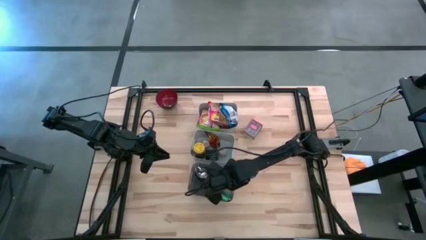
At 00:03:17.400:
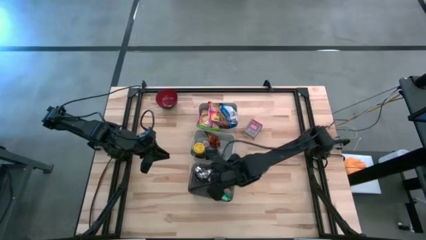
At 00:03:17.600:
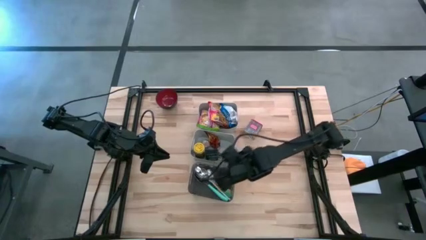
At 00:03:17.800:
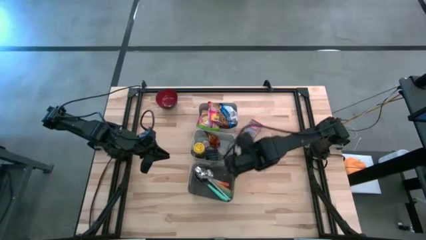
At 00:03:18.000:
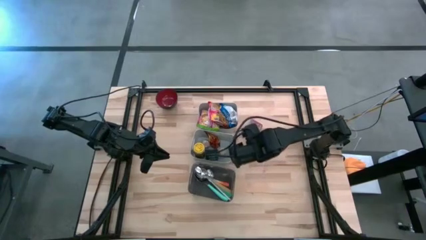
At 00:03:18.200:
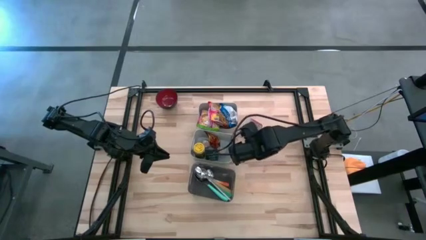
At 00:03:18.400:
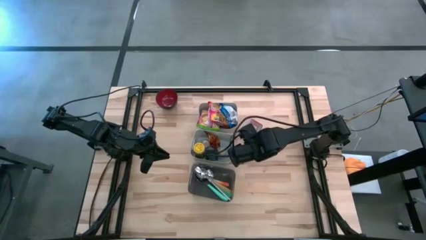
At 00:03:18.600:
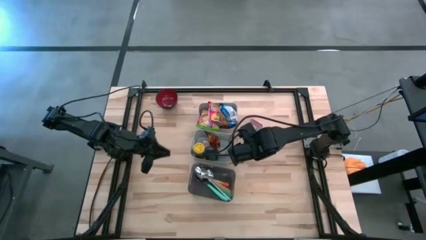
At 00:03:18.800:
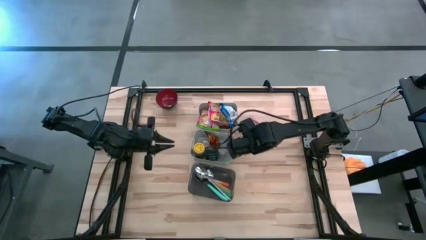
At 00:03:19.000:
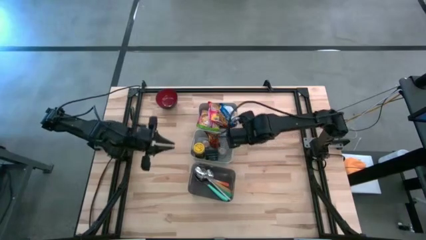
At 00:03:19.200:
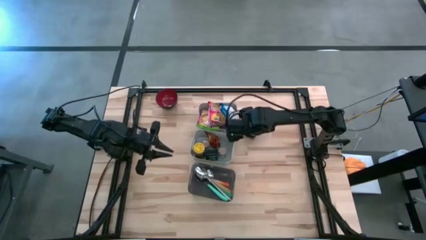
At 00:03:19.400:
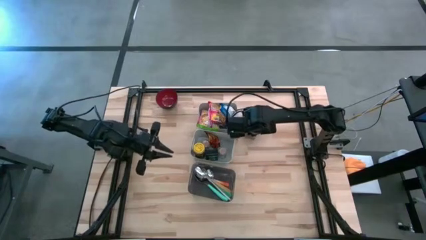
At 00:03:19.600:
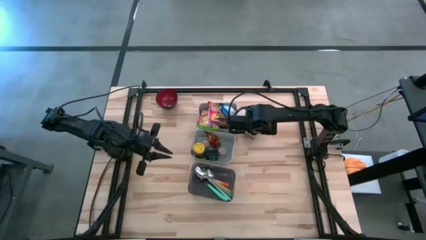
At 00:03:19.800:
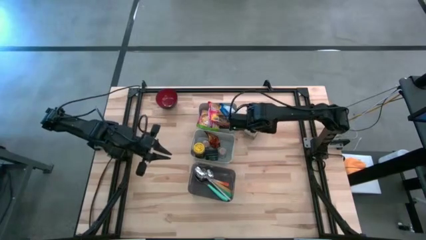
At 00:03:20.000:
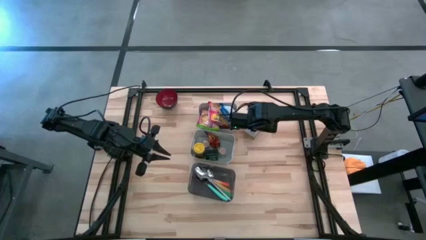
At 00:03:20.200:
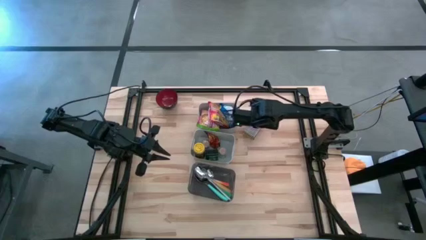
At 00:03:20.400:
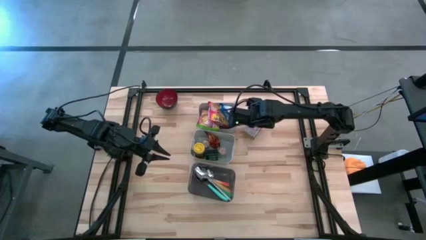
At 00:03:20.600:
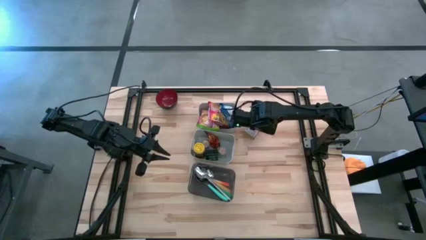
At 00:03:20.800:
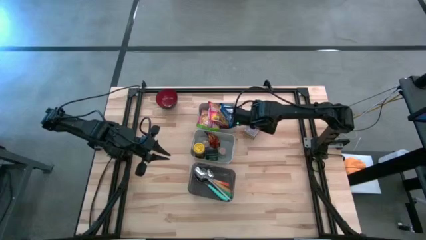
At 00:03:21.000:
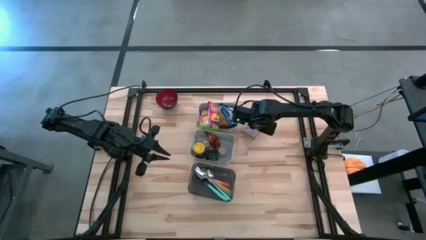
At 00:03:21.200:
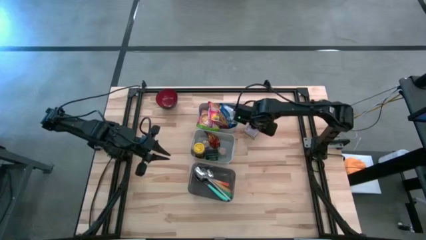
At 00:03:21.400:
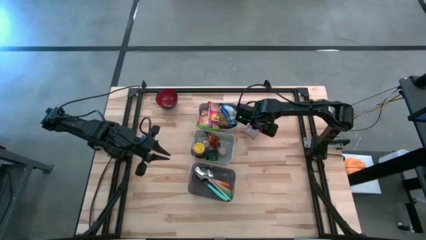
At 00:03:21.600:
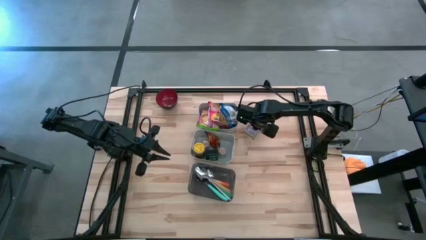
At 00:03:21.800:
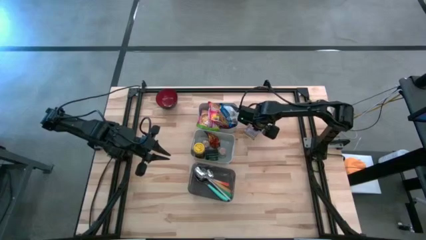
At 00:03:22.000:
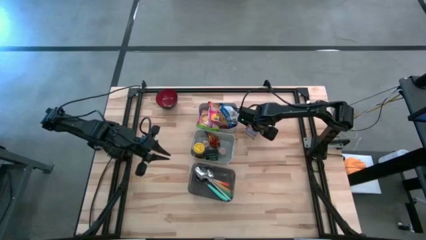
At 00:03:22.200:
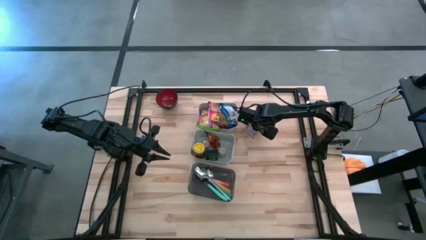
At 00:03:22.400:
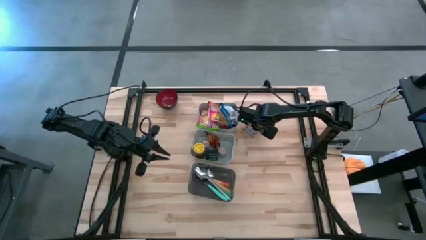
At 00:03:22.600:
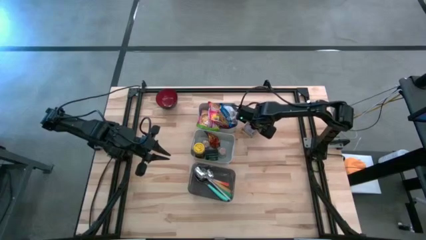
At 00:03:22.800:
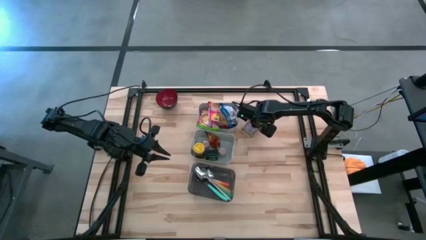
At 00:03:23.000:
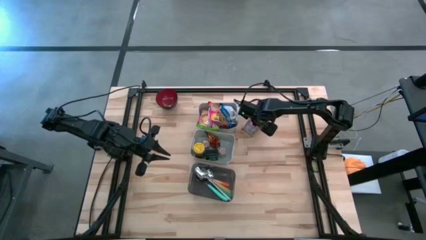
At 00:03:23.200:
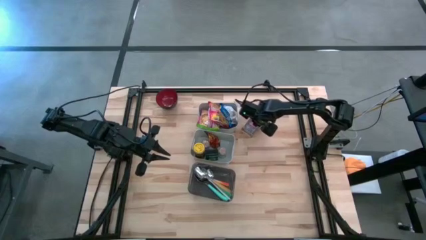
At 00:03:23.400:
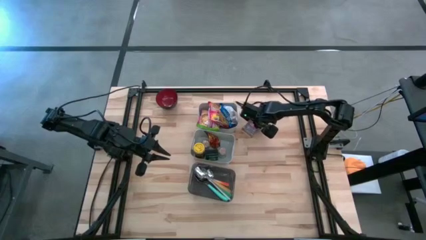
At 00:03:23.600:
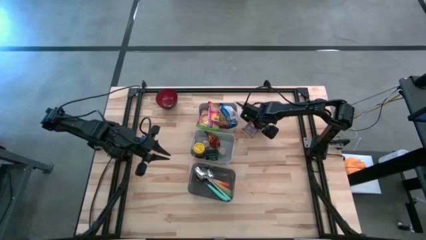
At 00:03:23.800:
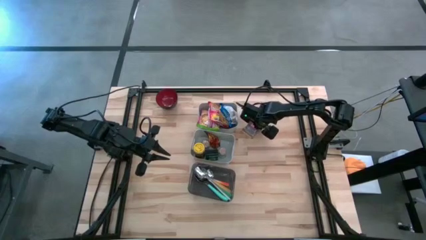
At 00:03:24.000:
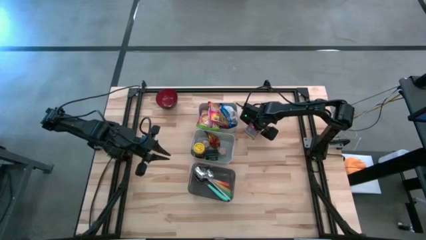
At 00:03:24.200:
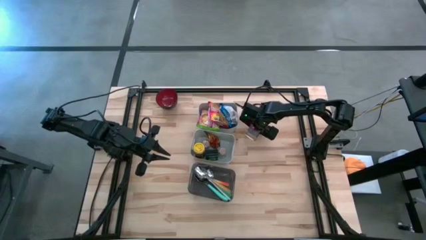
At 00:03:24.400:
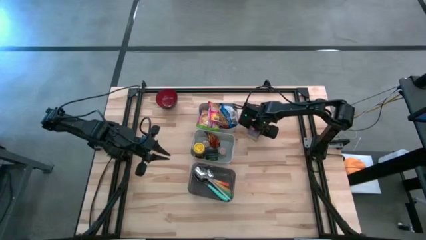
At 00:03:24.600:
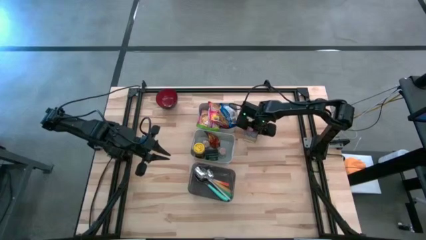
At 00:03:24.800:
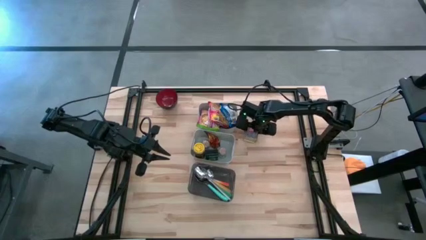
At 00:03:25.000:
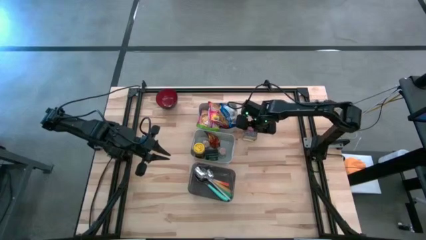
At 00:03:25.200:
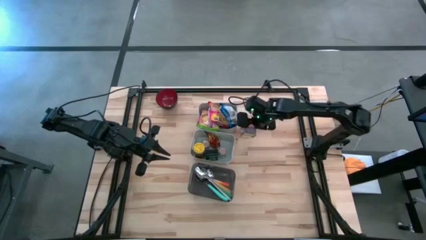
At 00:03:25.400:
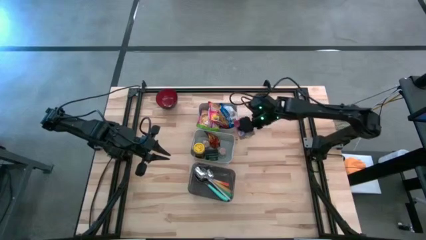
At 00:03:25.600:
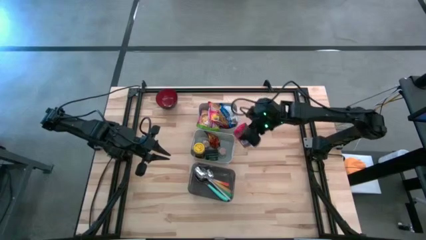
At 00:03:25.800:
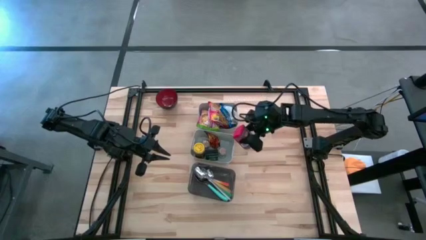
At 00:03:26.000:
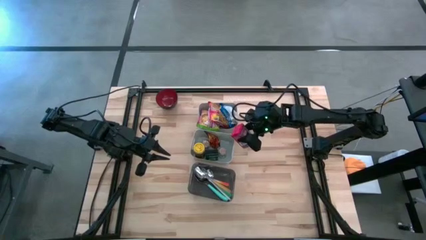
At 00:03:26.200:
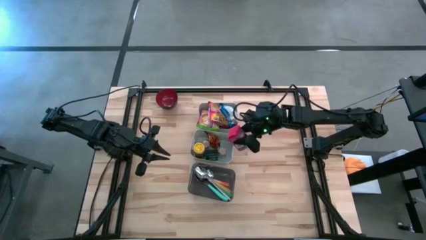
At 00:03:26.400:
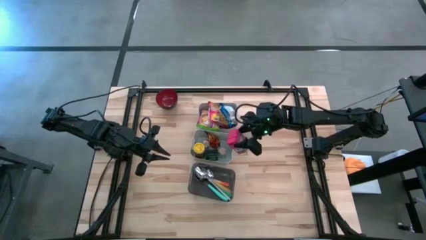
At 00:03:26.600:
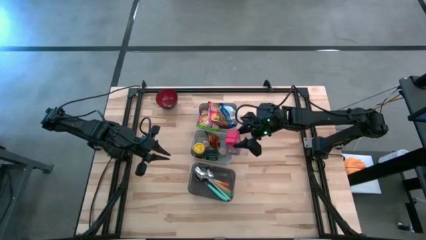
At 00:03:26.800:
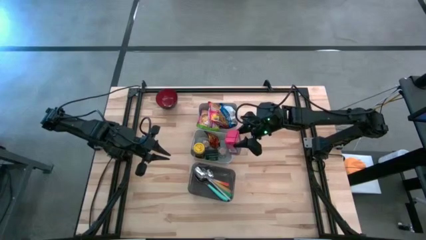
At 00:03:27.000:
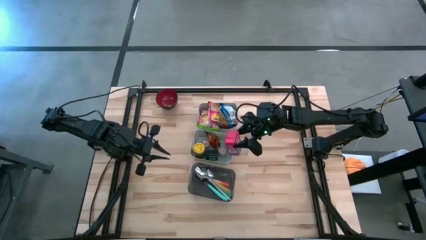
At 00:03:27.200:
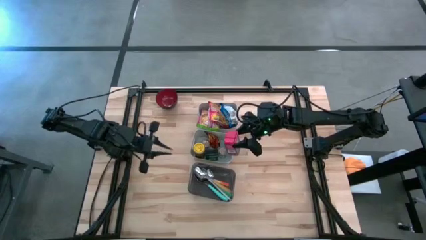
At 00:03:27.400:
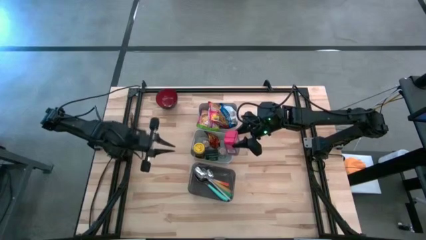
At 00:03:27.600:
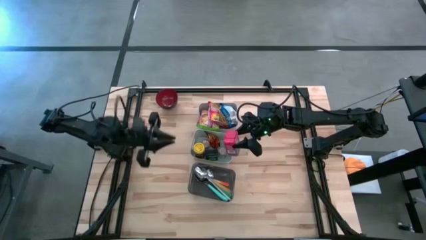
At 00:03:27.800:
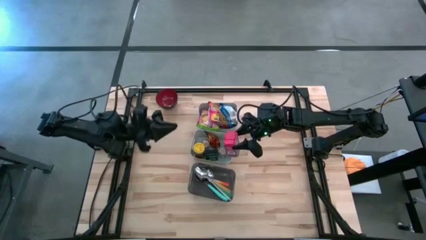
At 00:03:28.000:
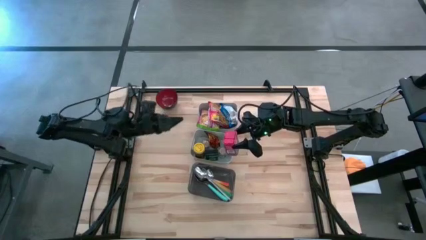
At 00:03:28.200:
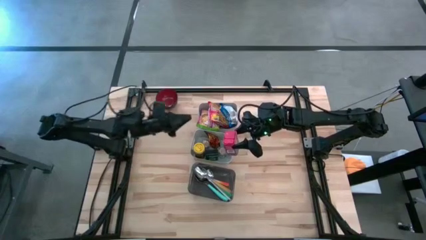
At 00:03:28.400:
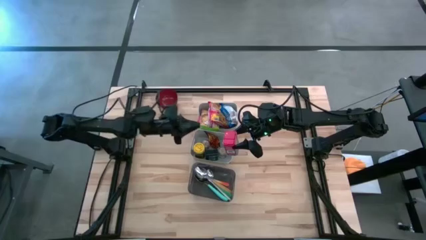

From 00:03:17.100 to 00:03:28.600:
Put the red seasoning can into the bottom gray bin
